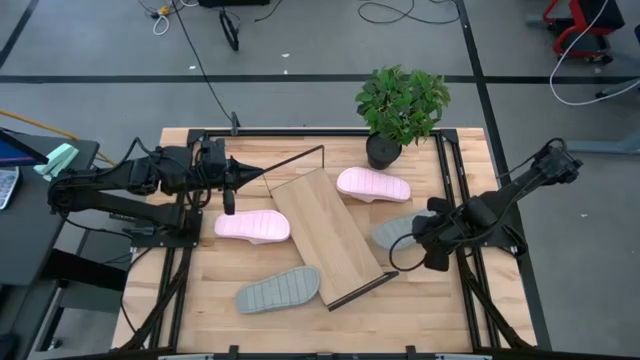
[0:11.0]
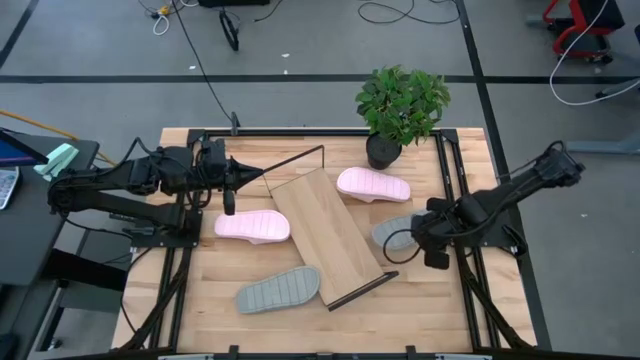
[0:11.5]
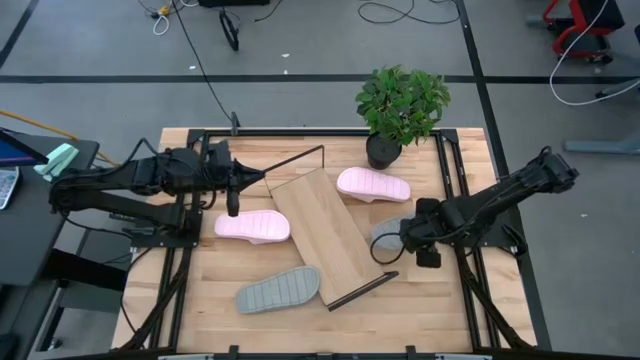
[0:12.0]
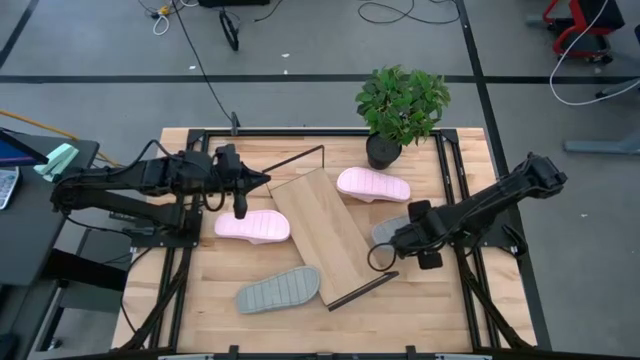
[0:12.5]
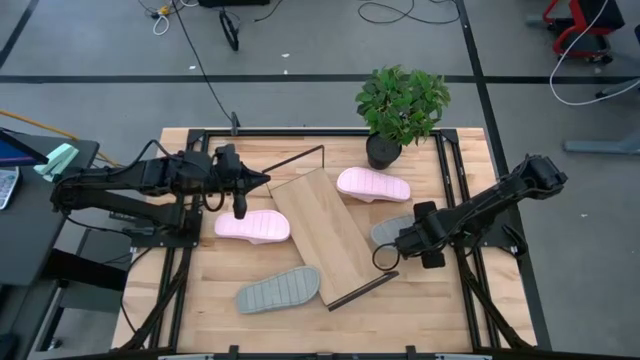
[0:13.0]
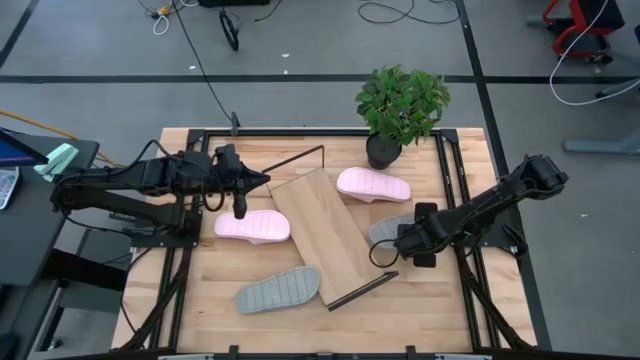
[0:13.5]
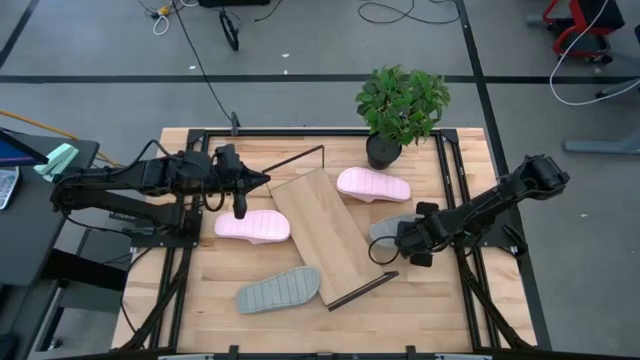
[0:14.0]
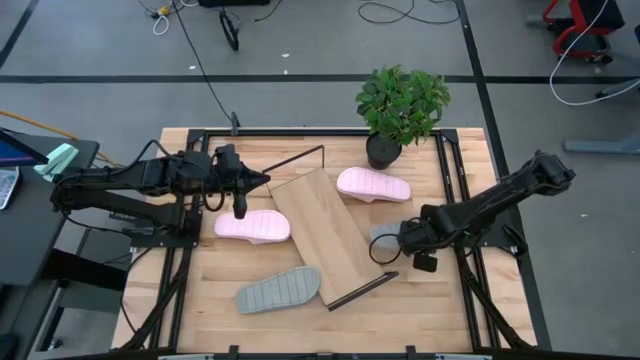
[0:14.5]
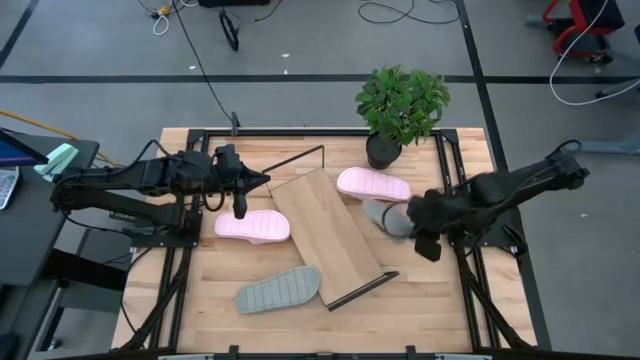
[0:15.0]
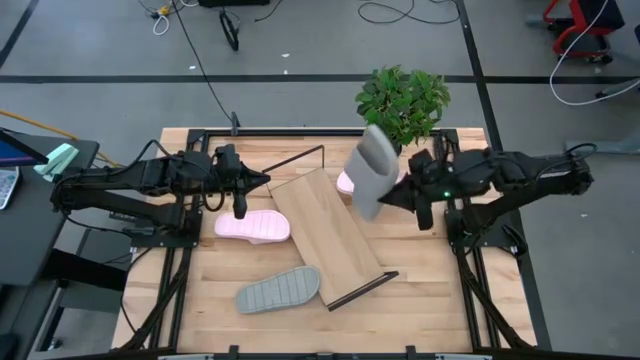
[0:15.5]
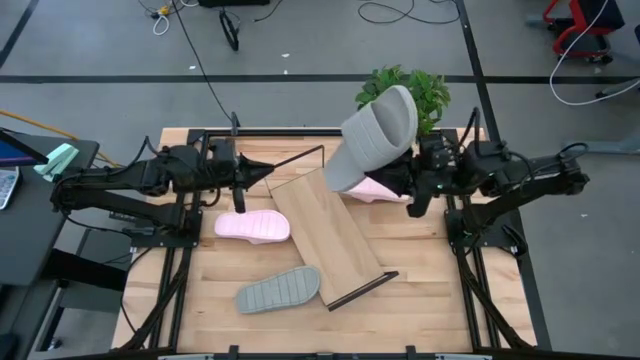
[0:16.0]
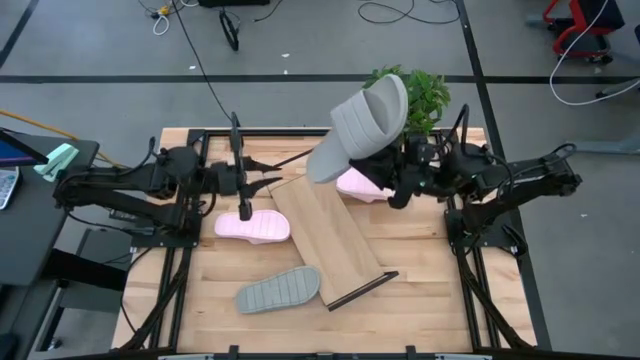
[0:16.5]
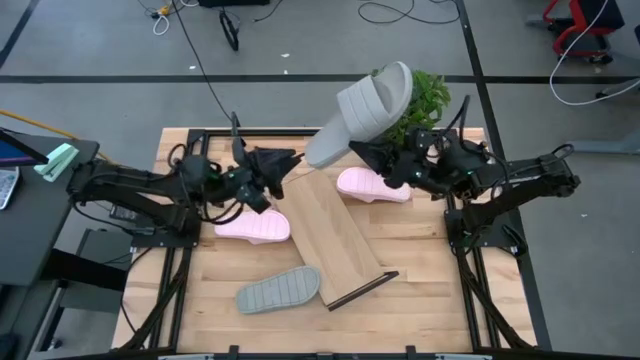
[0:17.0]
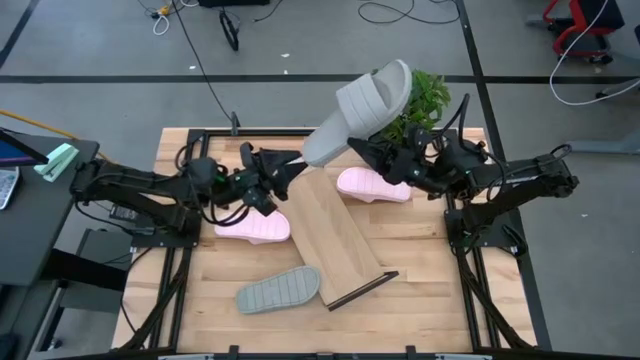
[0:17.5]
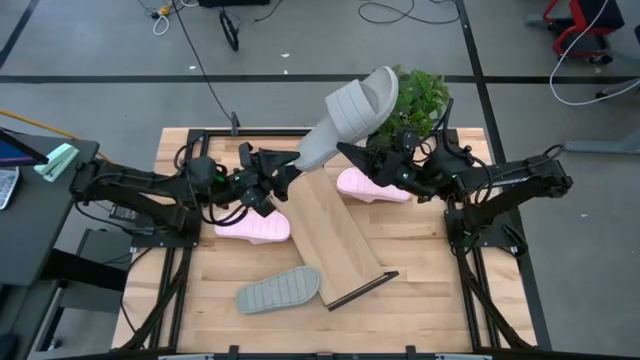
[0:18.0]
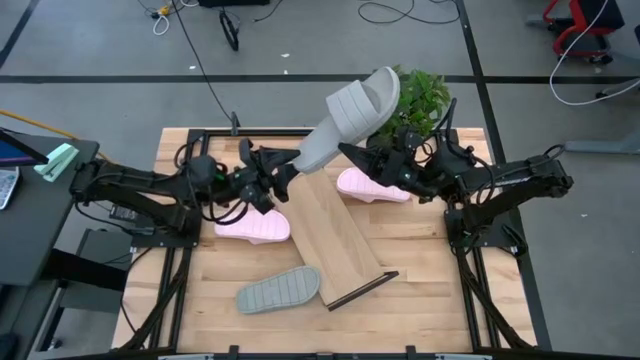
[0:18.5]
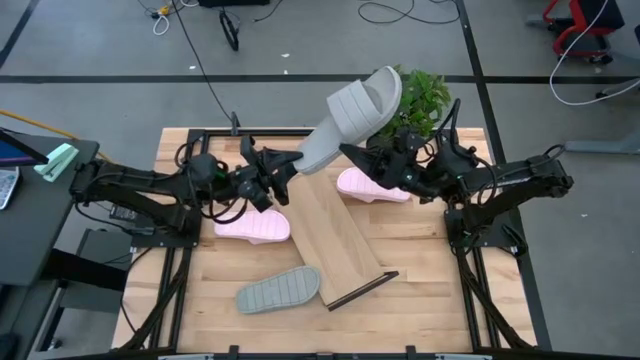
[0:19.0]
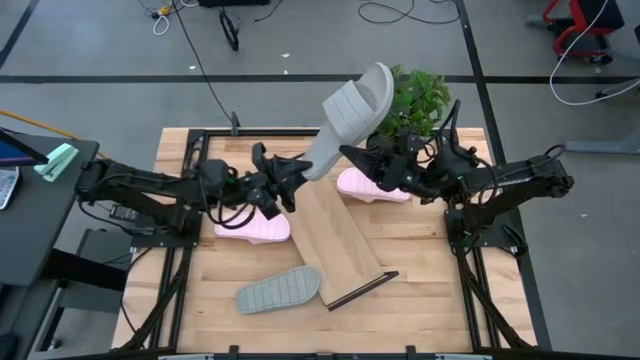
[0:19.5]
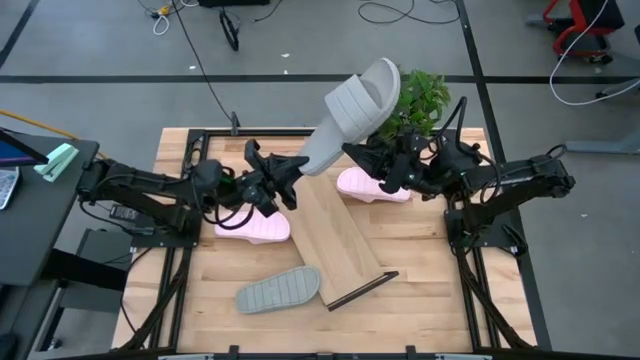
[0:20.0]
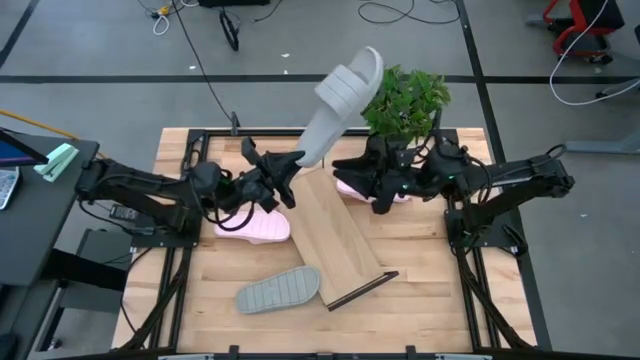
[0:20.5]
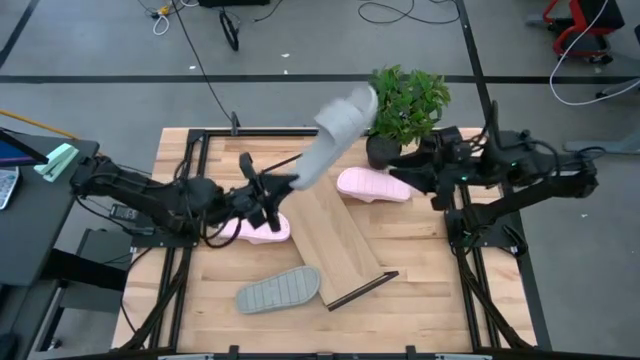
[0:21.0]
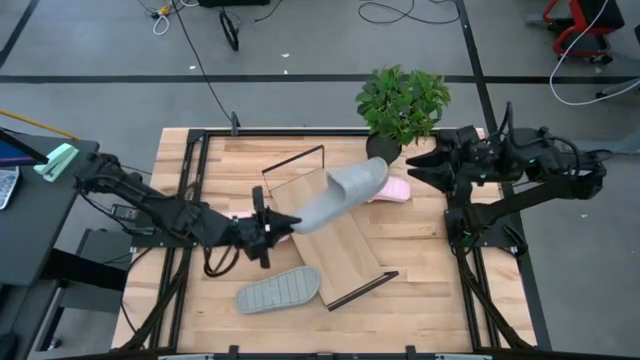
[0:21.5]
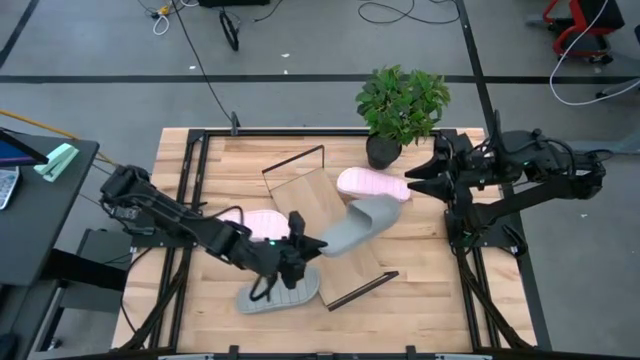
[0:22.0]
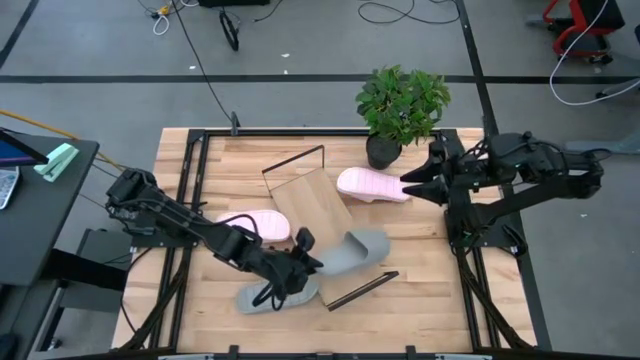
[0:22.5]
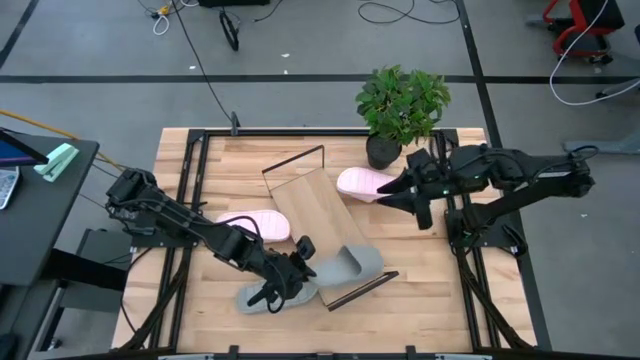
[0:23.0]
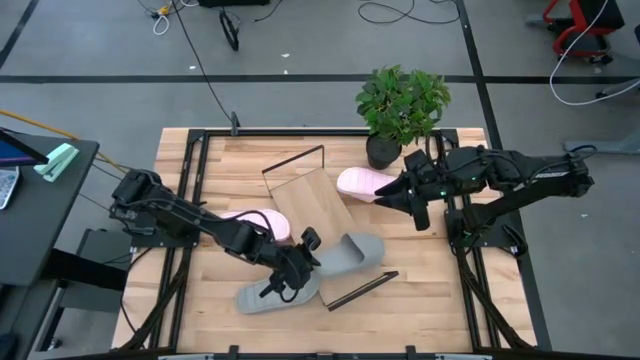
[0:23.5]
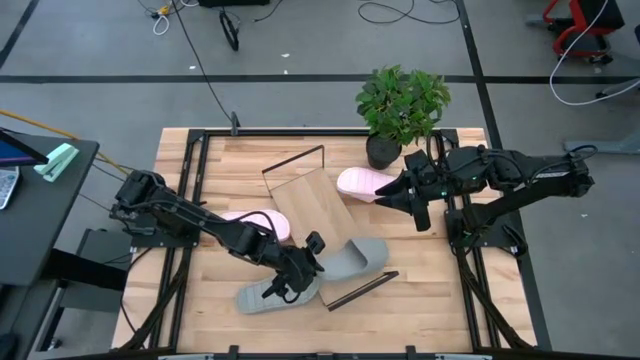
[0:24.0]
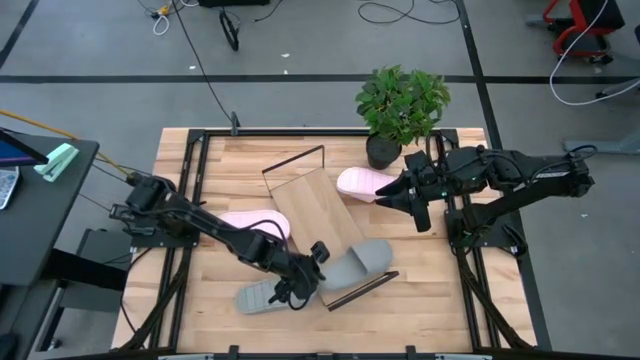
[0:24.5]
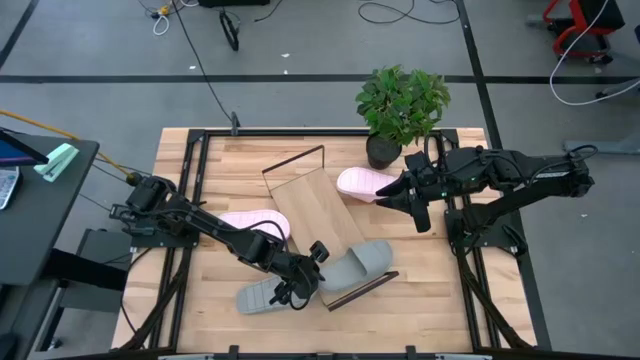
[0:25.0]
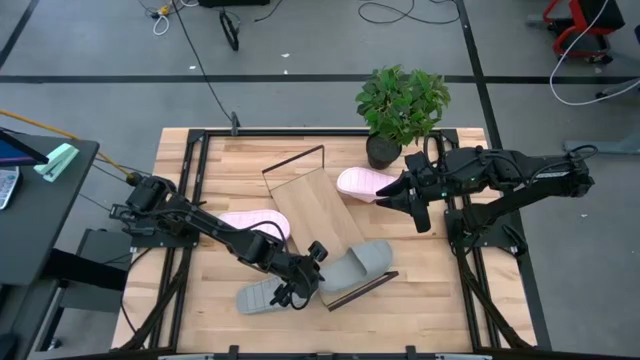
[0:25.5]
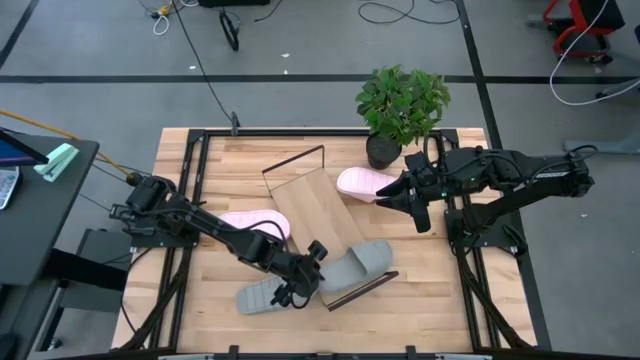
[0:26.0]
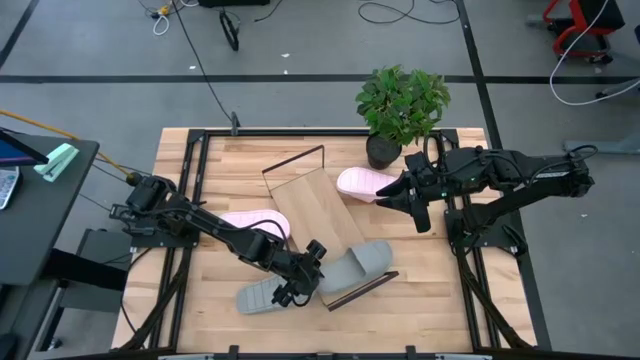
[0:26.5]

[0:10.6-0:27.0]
Task: Pick and place slides into the shelf
Put the right gray slide on the shelf
